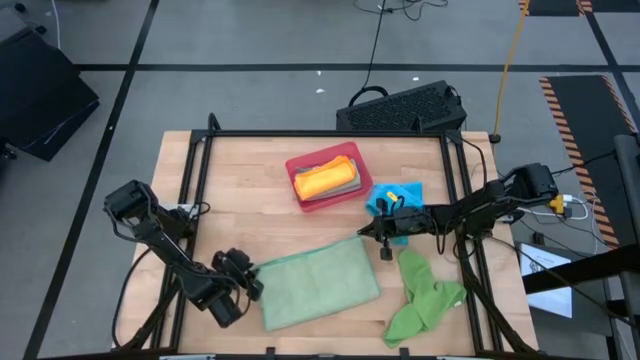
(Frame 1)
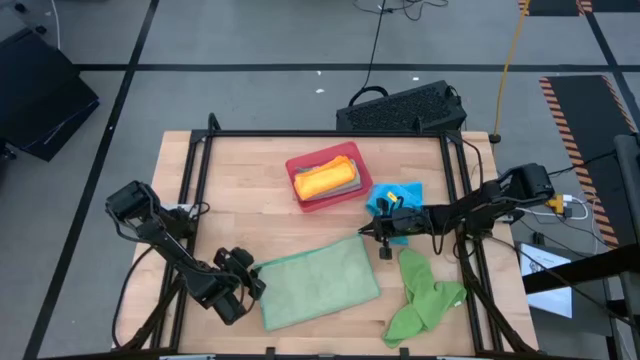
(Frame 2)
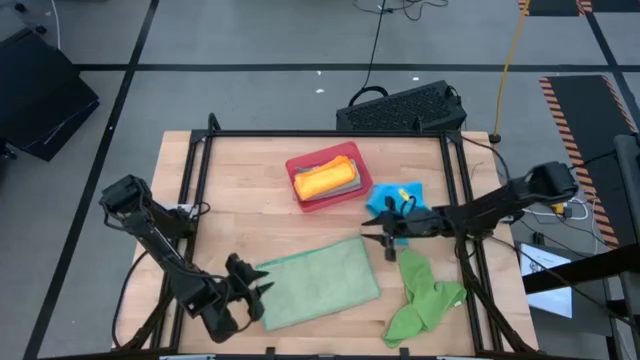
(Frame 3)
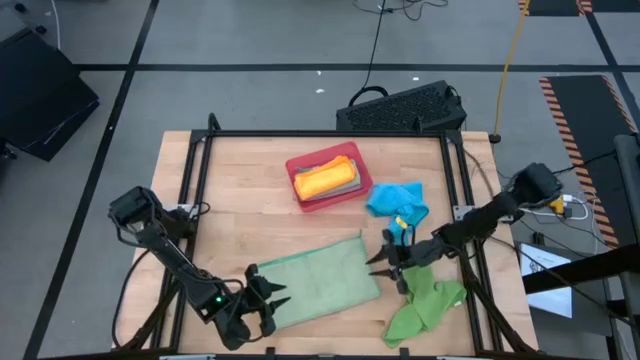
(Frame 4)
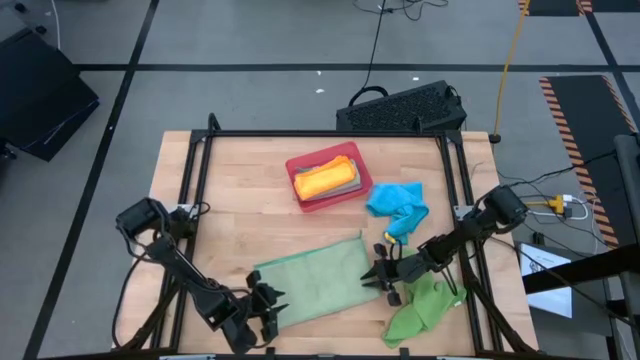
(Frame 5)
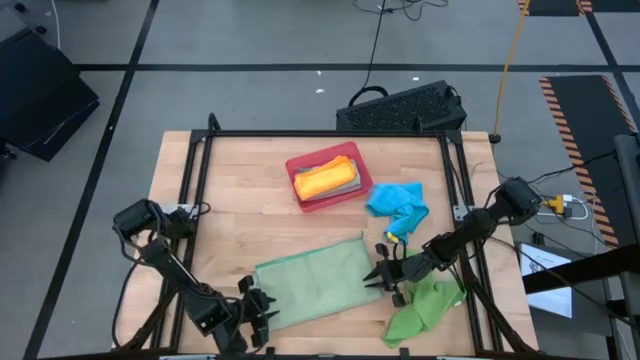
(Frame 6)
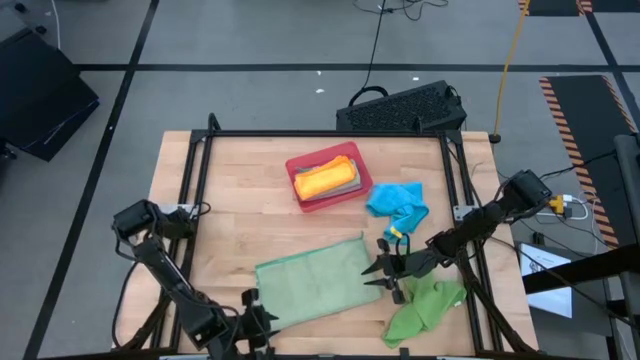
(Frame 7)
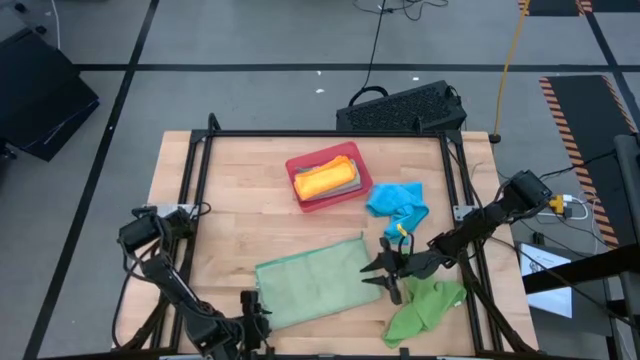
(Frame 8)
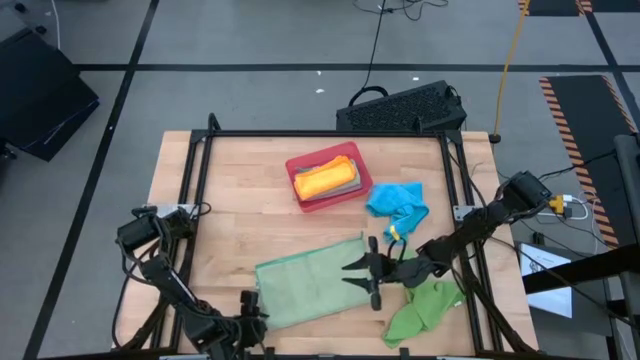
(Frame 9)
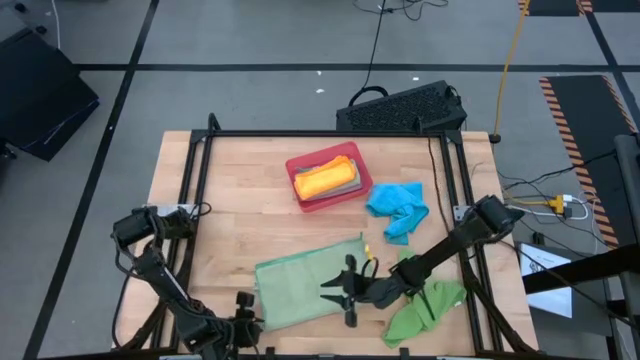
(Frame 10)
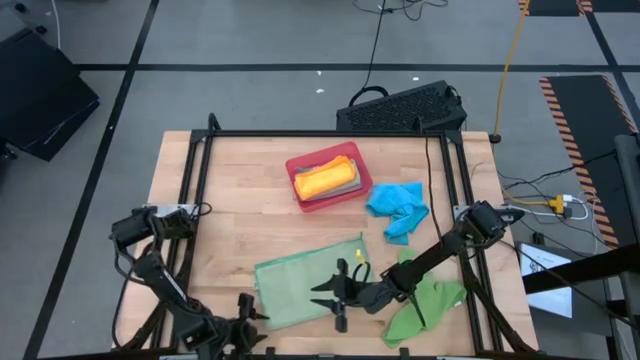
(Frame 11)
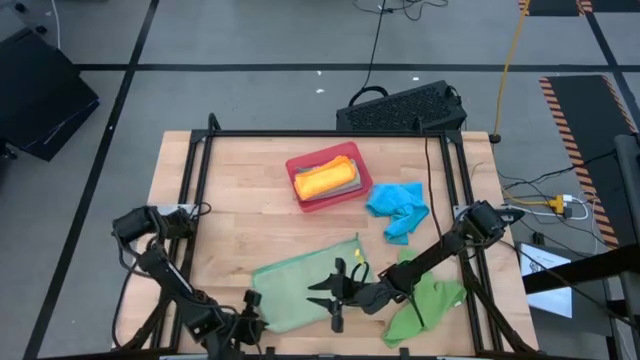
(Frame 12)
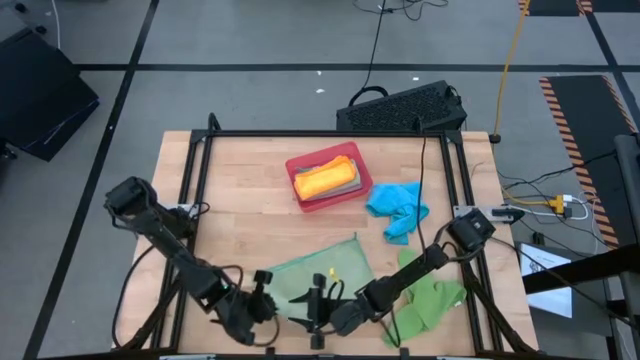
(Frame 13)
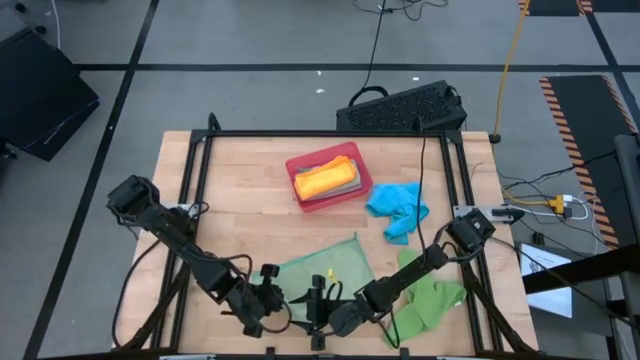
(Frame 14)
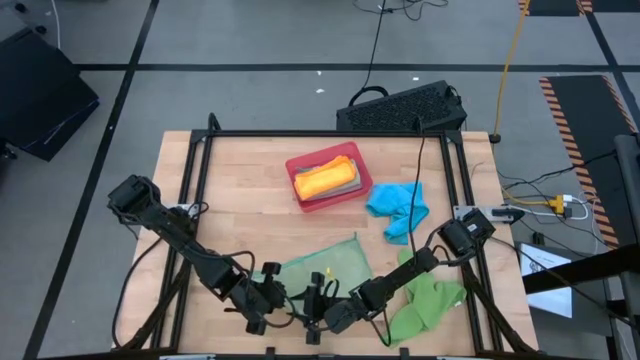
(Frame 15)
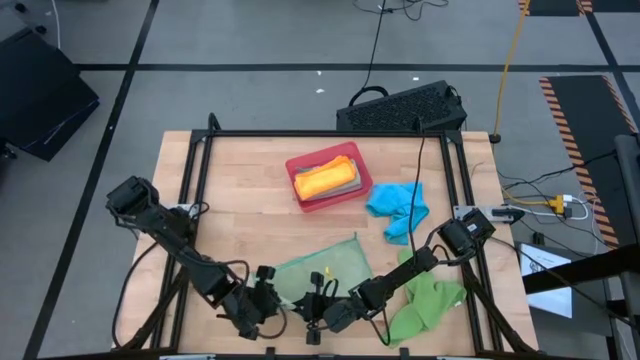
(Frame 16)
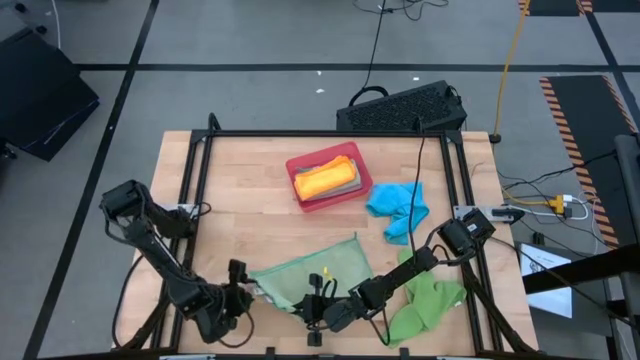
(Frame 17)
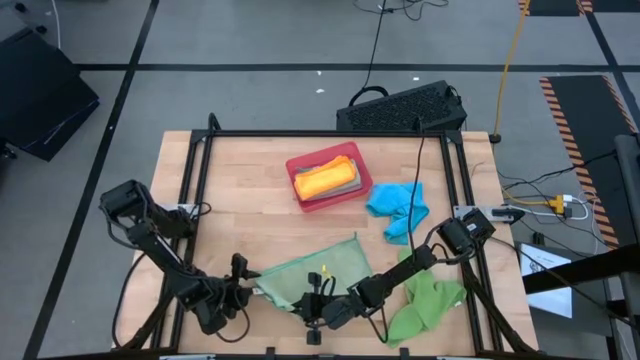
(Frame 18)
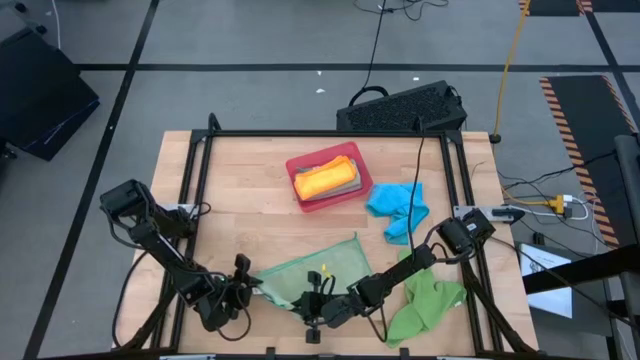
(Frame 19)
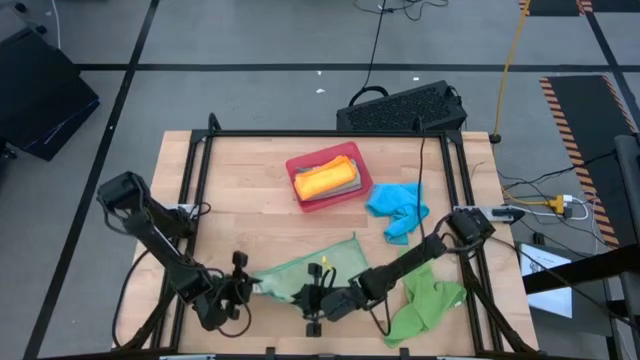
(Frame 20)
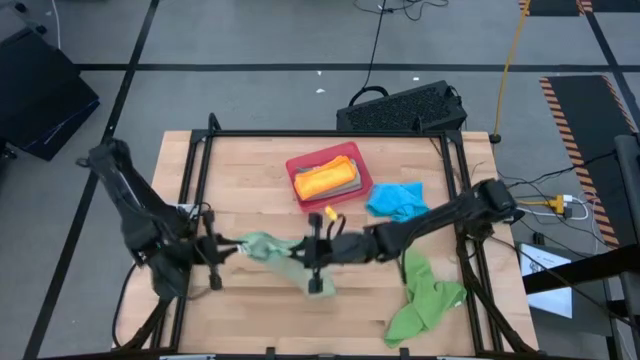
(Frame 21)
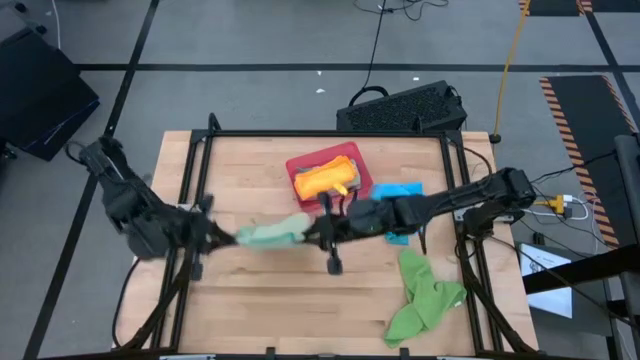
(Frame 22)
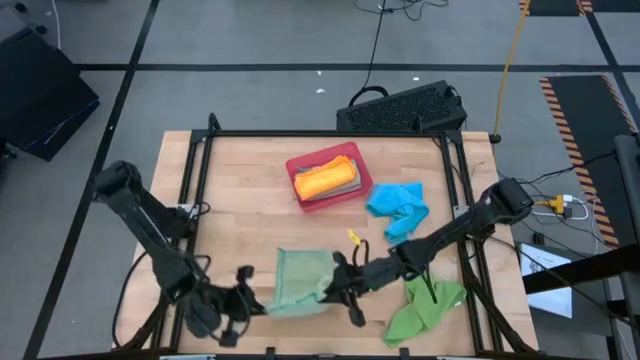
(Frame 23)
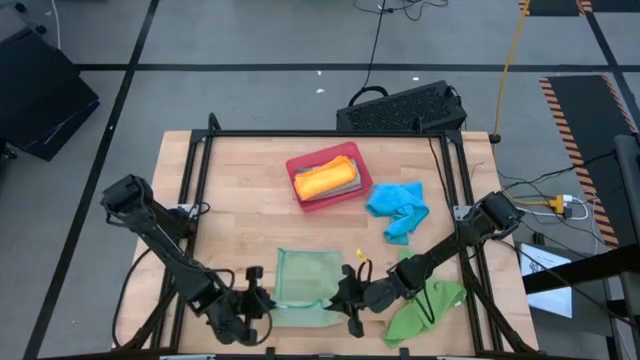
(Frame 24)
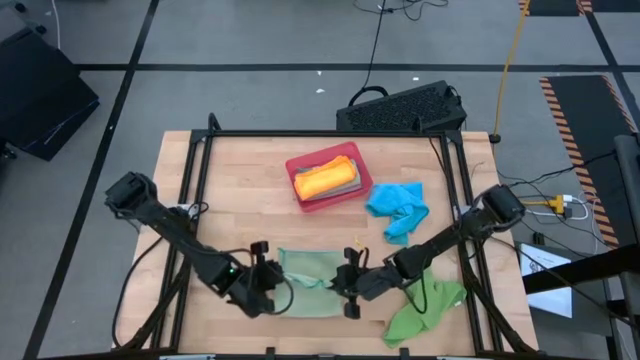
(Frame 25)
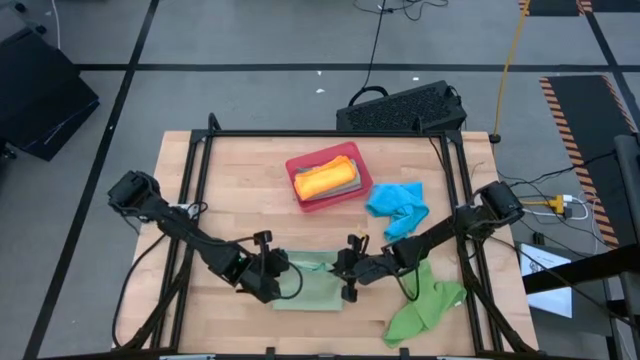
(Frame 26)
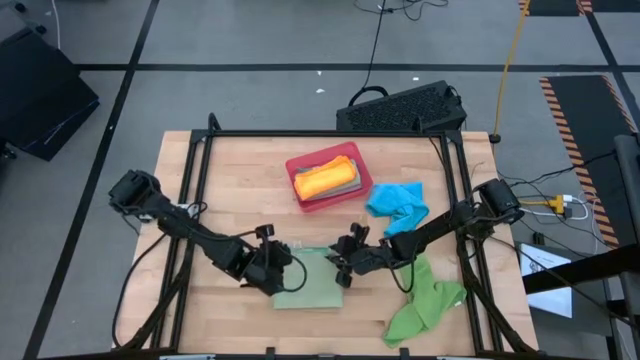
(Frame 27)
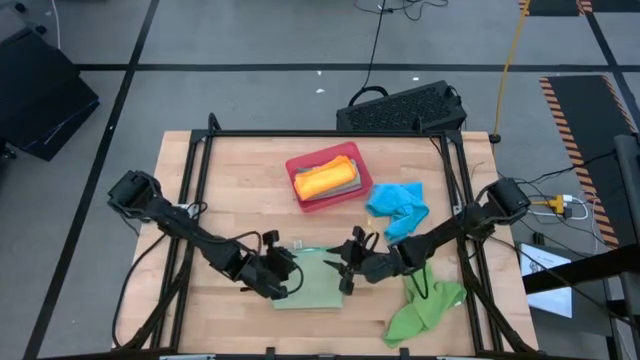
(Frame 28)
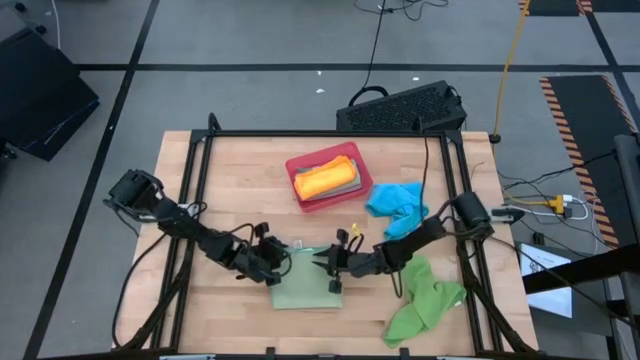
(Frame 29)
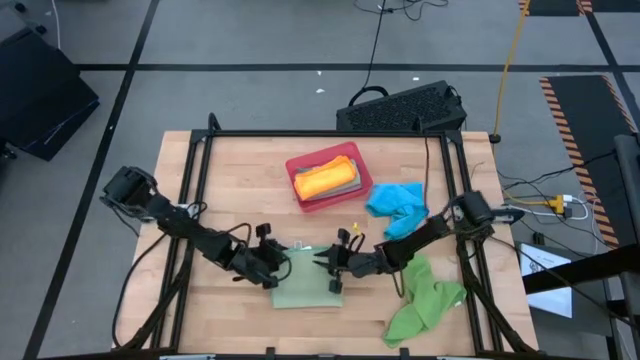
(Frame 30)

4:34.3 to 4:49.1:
Task: Fold microfiber towels
Fold the light green microfiber cloth
